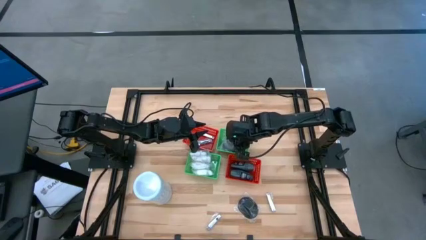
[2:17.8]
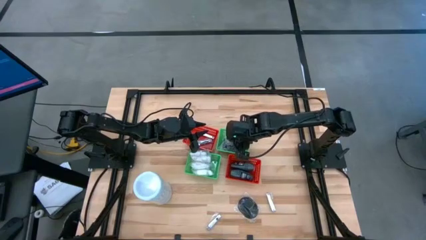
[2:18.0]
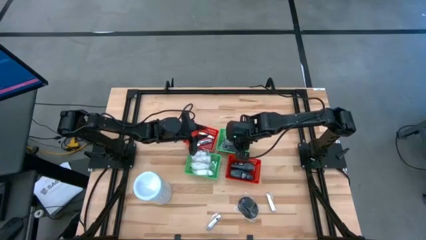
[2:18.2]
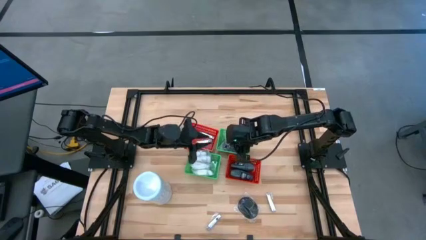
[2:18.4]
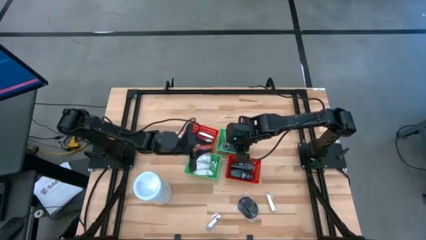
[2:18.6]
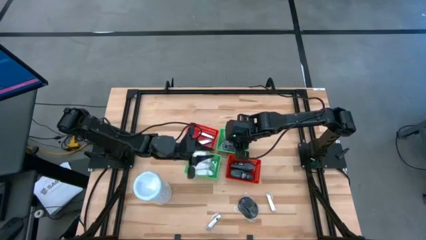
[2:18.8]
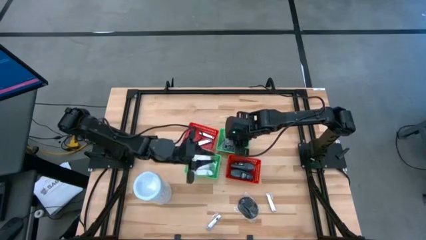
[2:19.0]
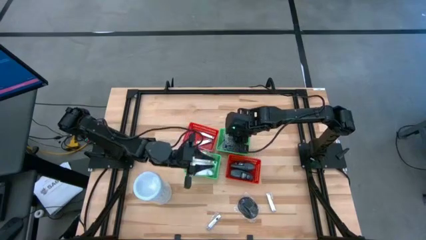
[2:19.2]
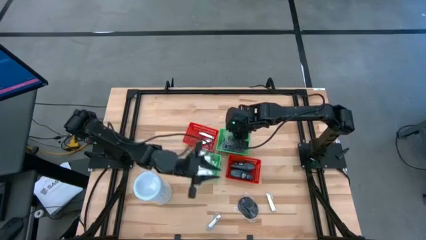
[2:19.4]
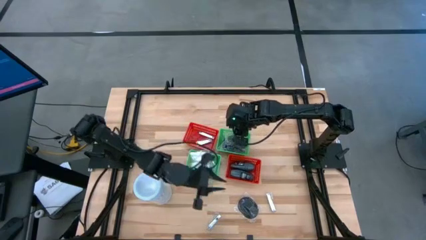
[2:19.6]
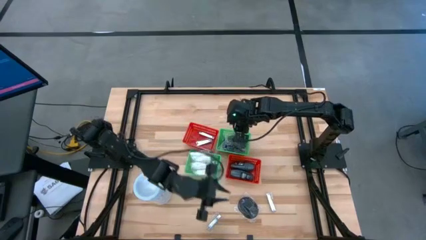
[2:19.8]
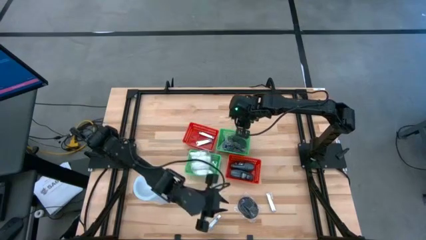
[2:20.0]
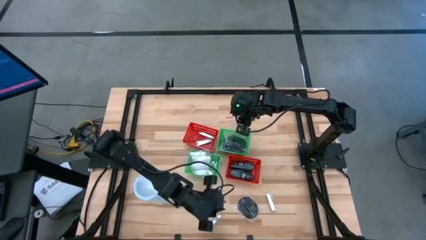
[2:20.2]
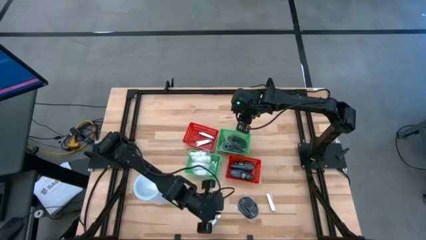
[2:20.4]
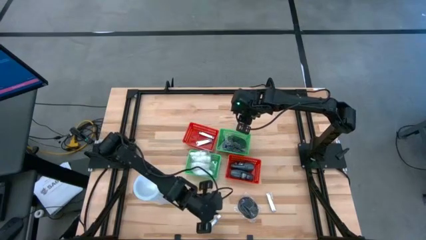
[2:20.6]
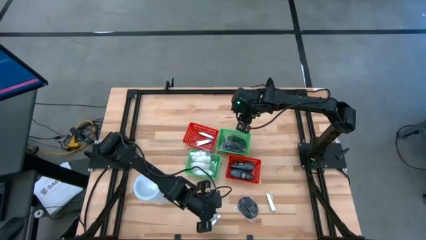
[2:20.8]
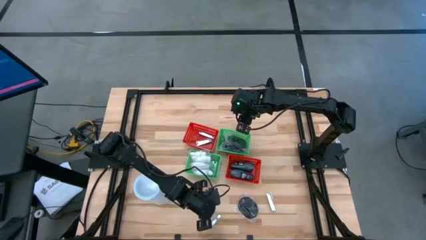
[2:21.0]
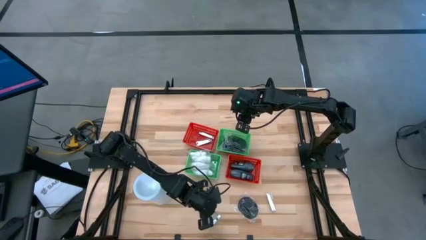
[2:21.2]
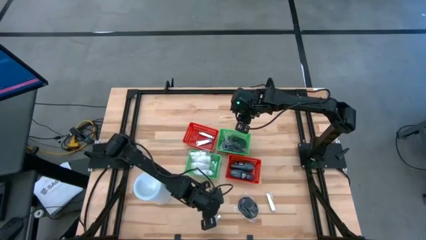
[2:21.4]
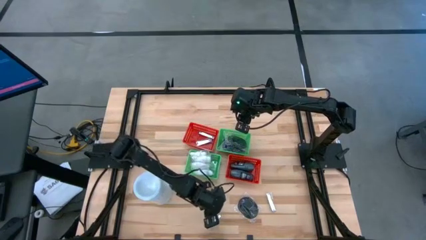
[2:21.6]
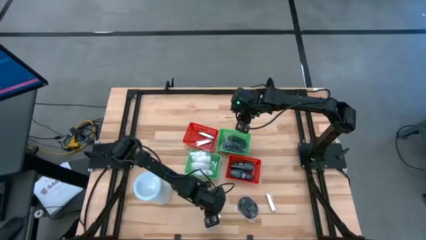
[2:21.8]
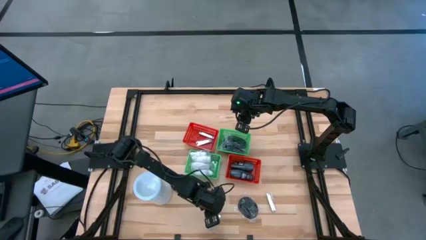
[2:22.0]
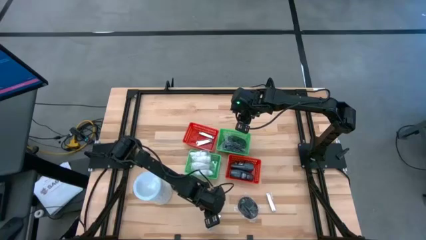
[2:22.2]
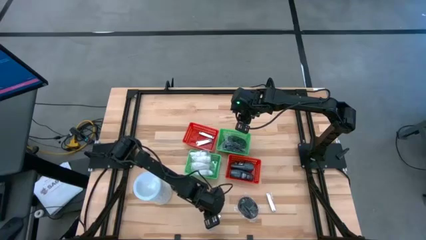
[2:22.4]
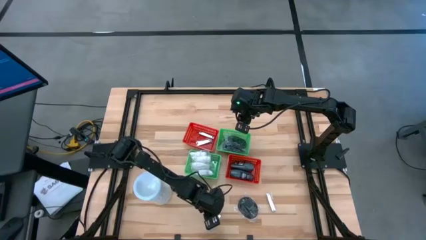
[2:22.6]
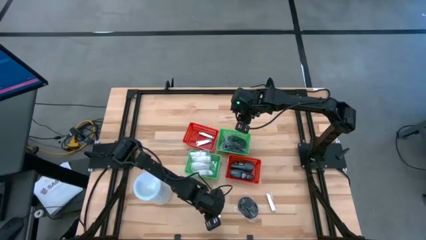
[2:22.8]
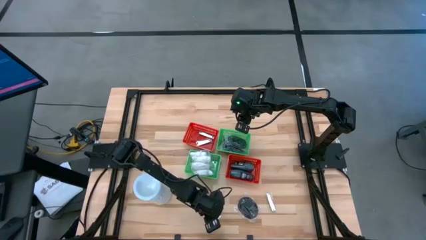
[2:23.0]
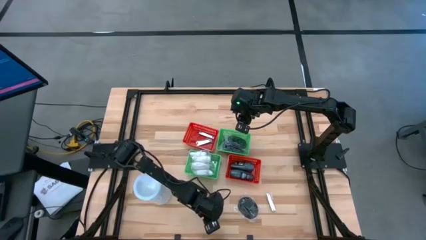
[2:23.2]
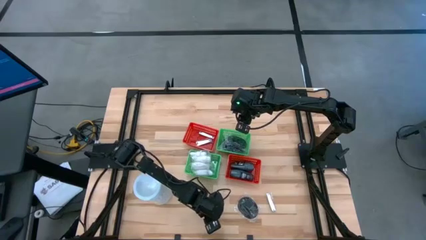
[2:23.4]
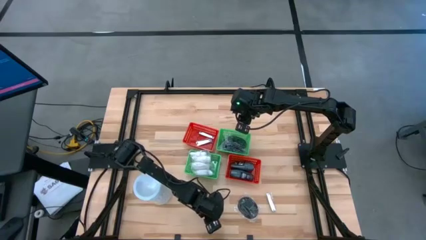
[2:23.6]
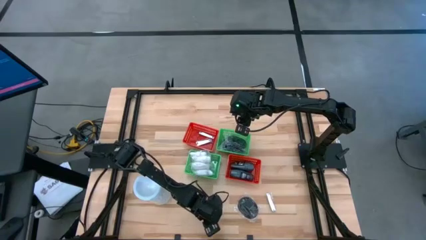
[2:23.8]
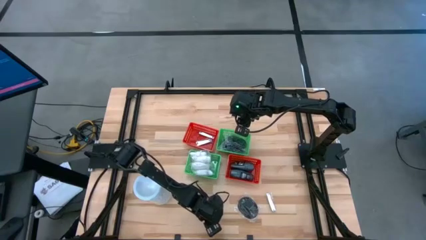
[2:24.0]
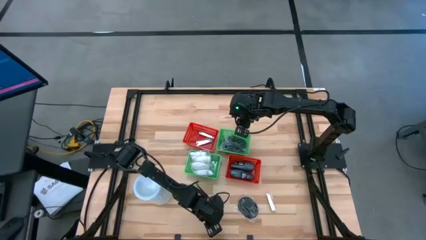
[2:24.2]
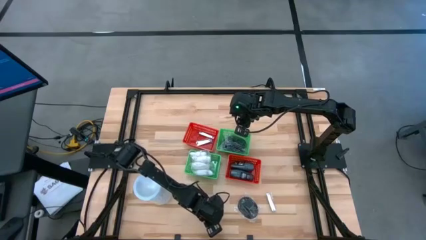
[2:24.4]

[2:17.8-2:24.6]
Task: Pick & Place Travel size toiletries
Put the silver nail cutter into the top left red bin

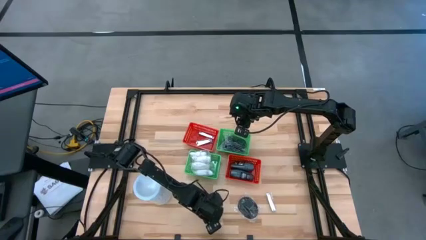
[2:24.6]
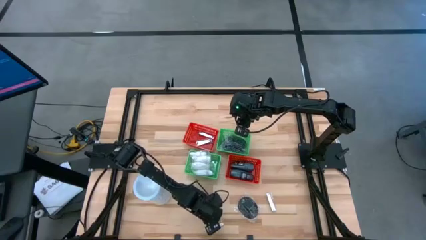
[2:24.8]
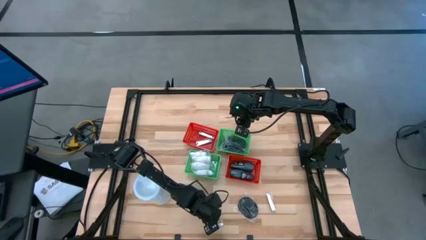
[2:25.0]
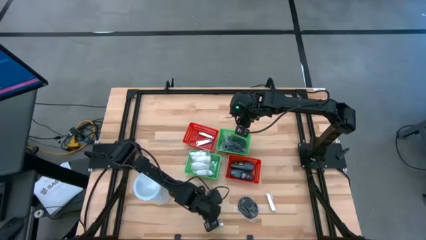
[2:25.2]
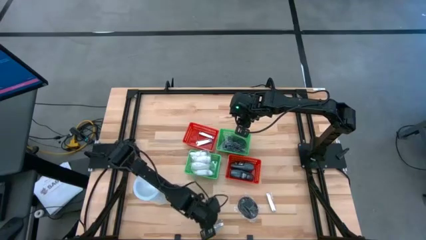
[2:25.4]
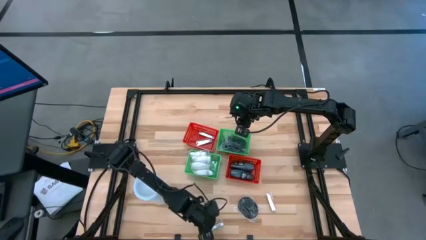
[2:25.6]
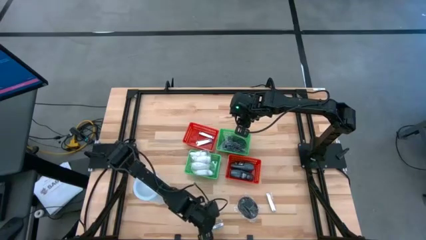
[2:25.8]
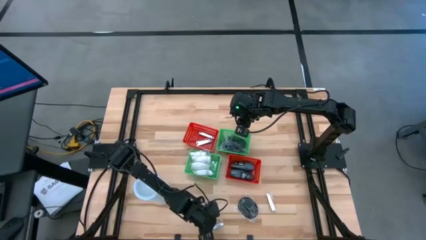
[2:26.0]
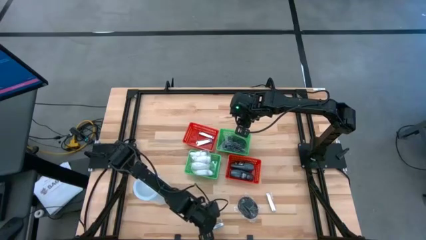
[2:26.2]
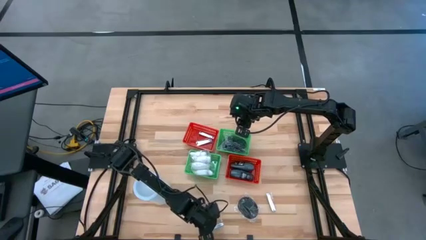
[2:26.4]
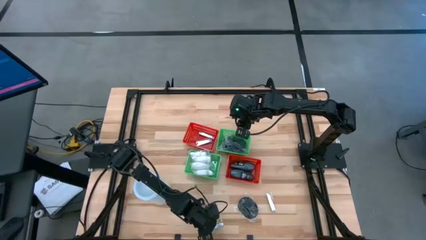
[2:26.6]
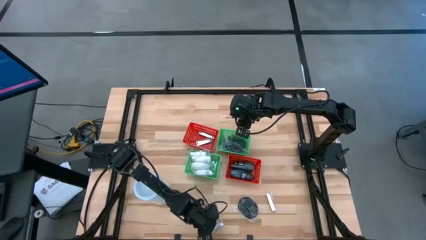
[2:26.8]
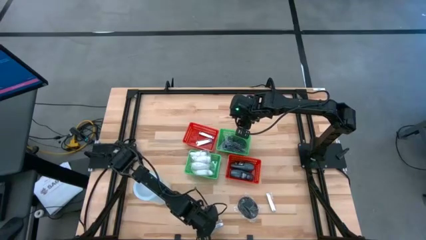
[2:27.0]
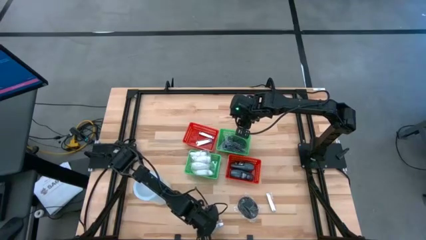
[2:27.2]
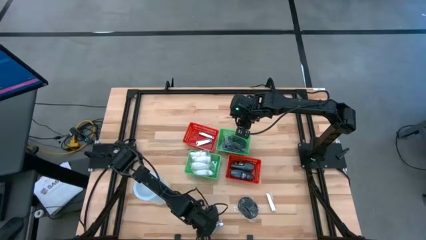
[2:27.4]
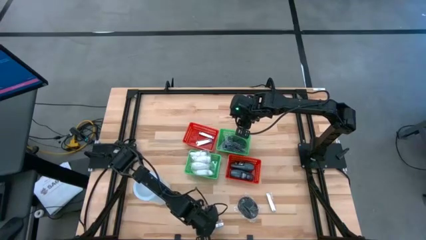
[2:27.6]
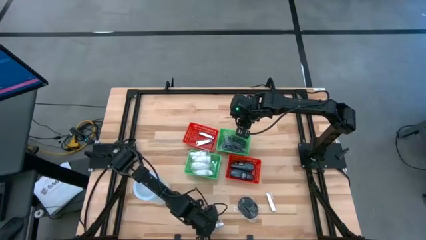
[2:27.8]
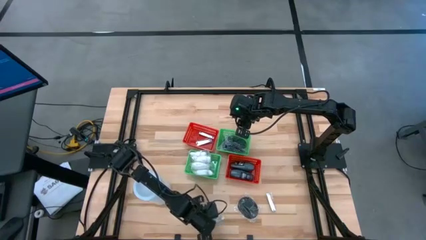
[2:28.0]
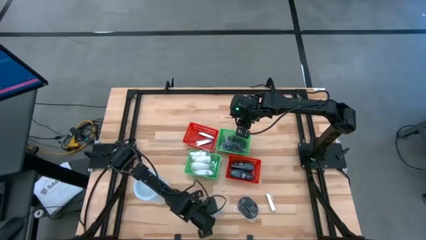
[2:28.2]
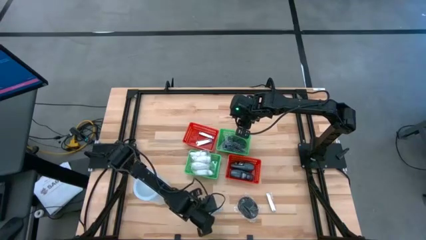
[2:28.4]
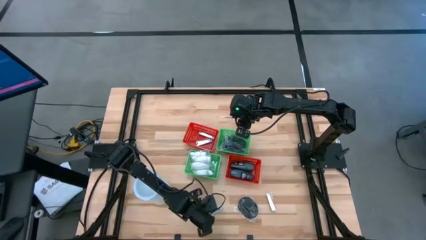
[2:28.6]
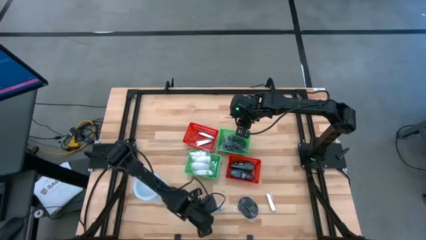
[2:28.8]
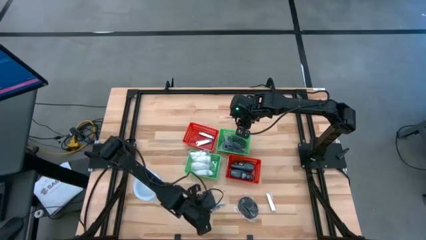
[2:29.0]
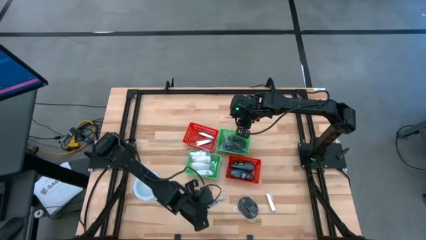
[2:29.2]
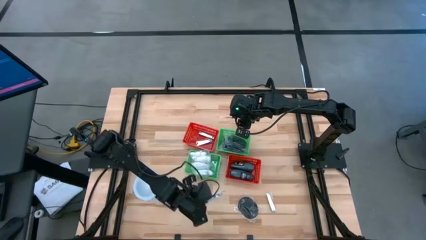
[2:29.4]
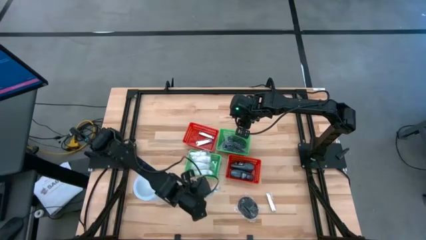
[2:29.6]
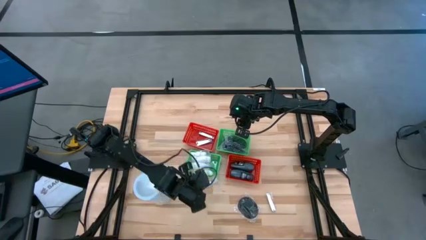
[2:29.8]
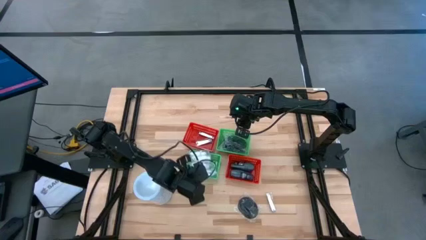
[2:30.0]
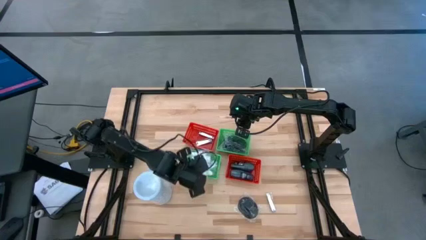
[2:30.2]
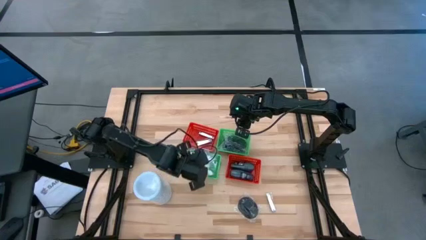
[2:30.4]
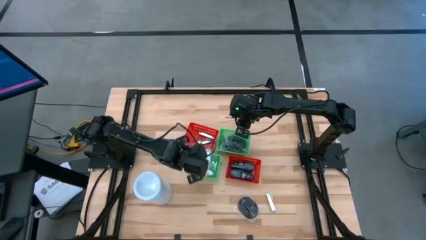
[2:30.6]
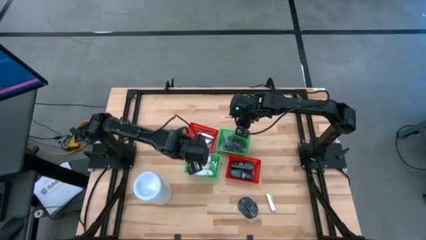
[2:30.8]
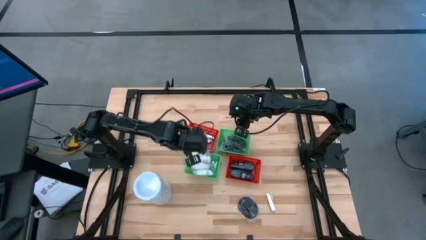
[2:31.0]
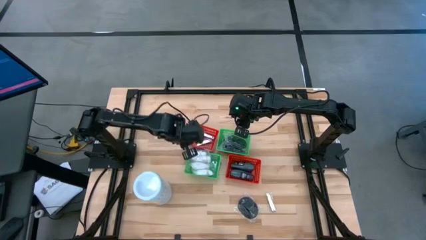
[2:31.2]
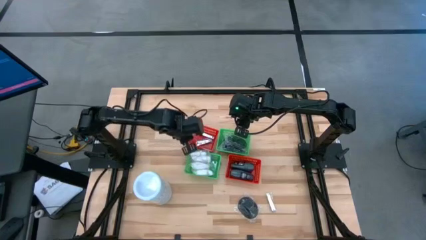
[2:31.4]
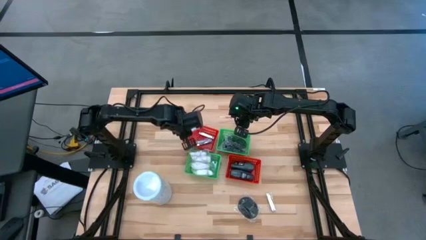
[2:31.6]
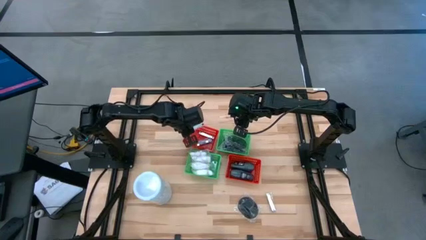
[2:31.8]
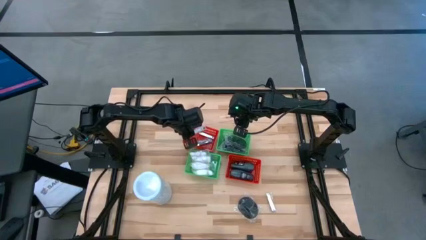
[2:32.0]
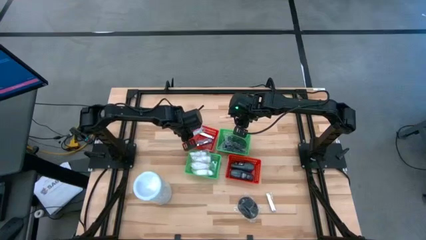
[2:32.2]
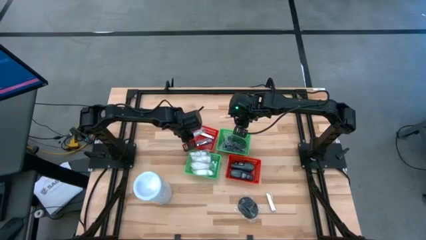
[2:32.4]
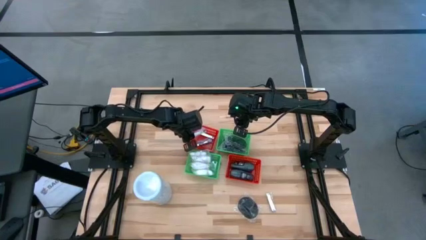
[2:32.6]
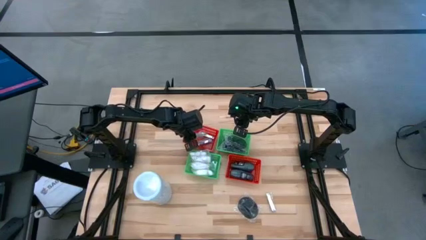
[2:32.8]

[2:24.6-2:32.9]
Put the silver nail cutter into the top left red bin
